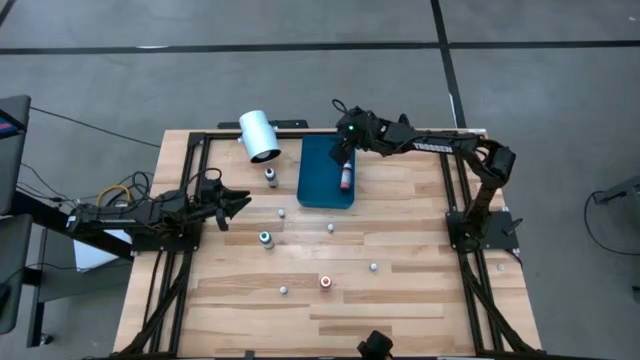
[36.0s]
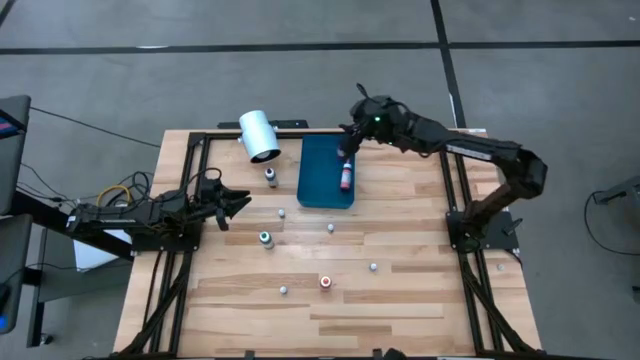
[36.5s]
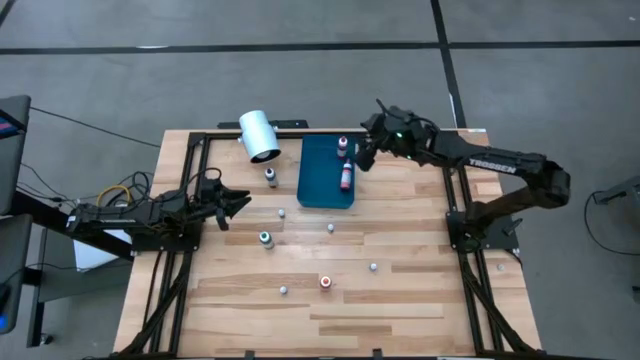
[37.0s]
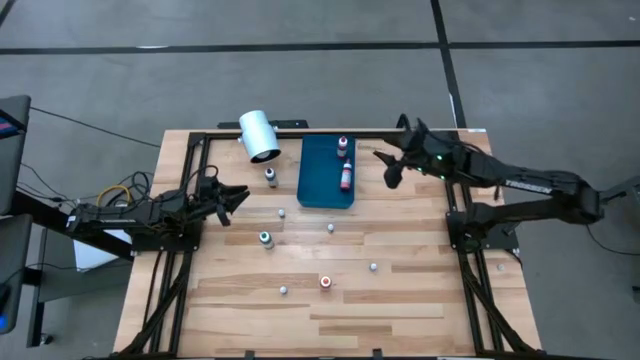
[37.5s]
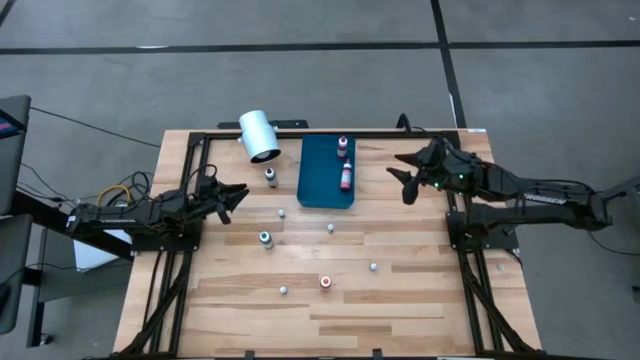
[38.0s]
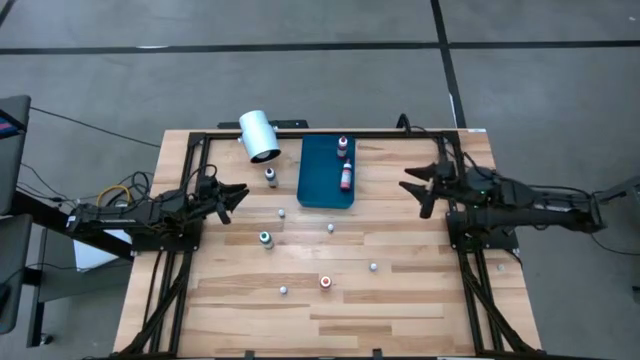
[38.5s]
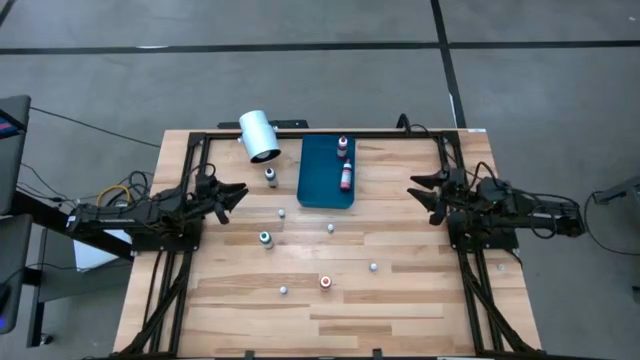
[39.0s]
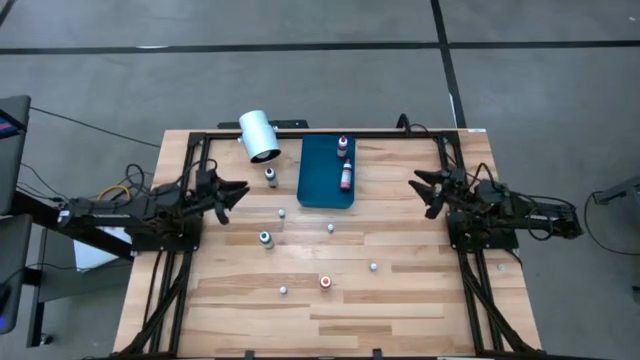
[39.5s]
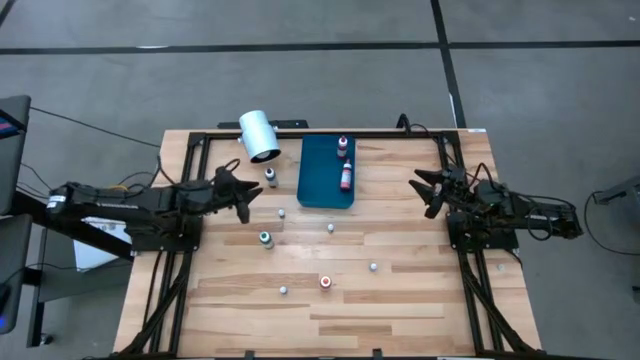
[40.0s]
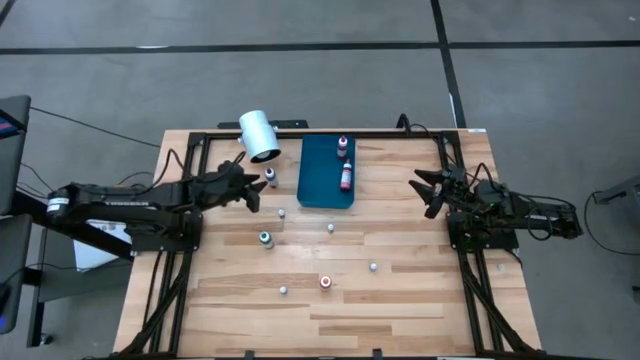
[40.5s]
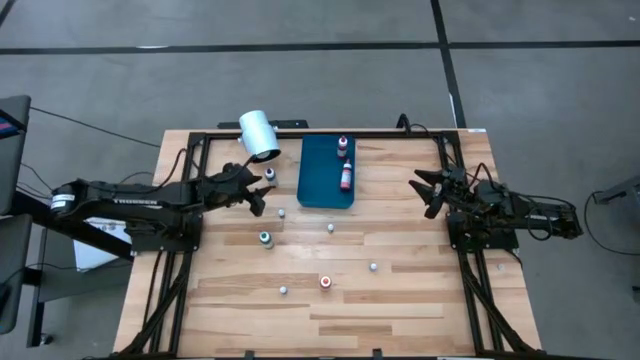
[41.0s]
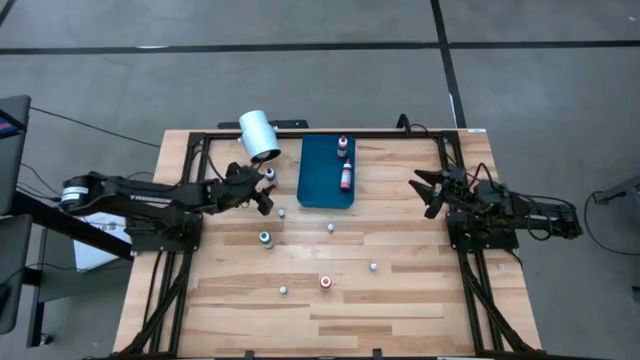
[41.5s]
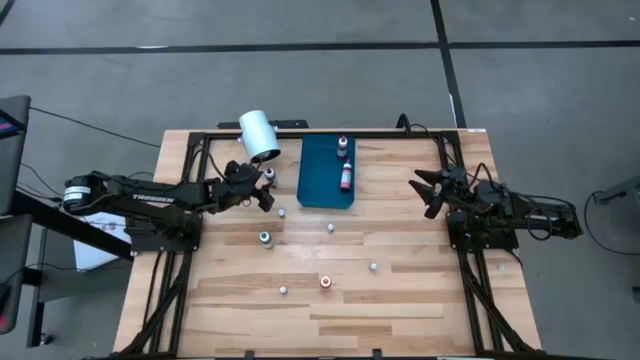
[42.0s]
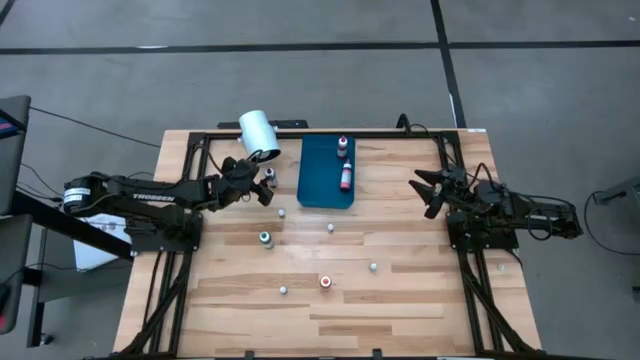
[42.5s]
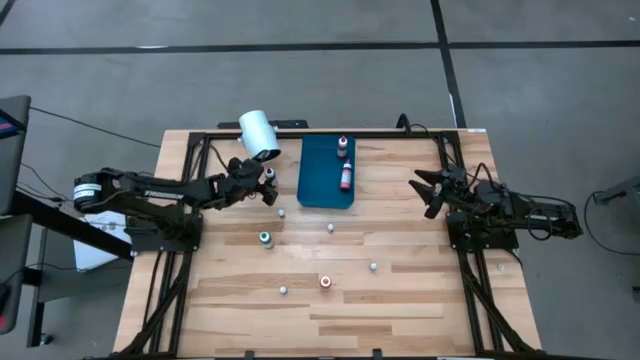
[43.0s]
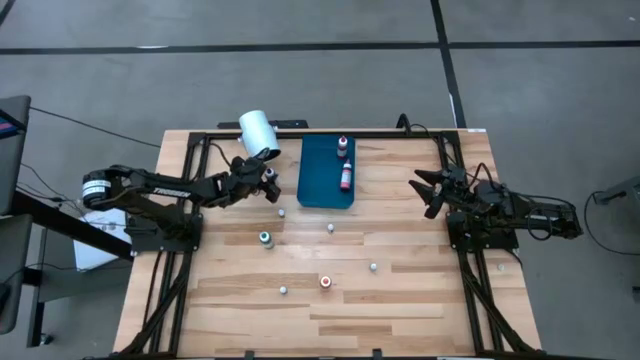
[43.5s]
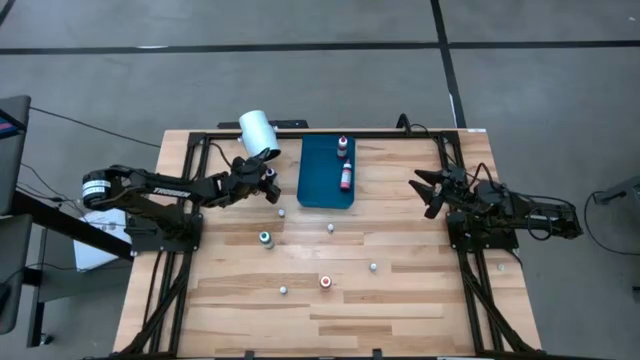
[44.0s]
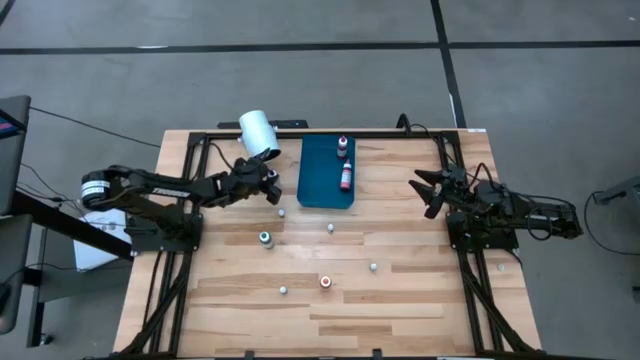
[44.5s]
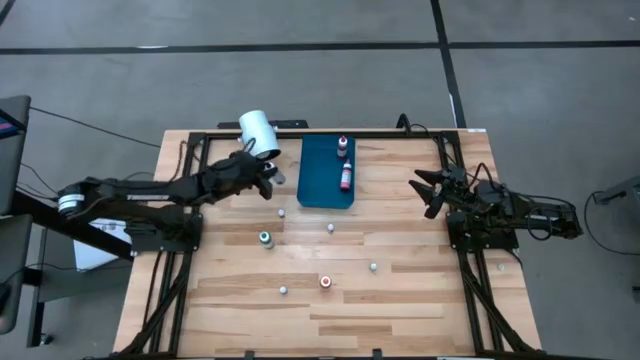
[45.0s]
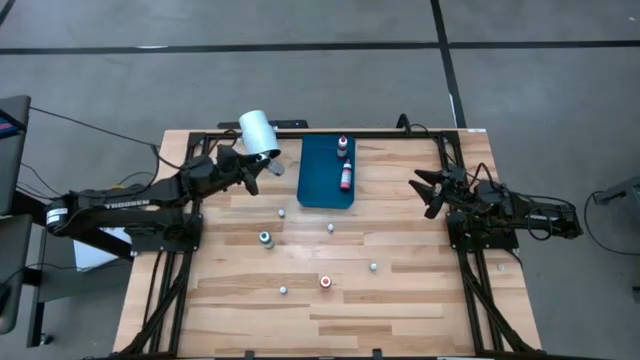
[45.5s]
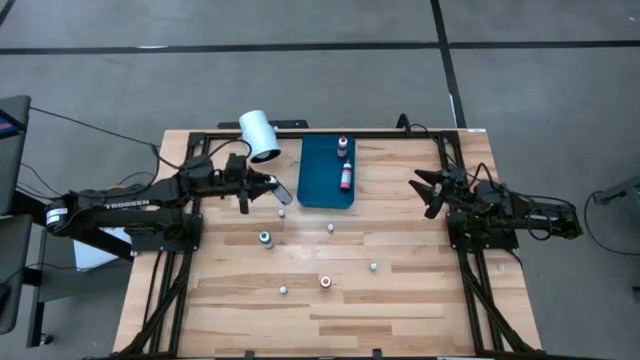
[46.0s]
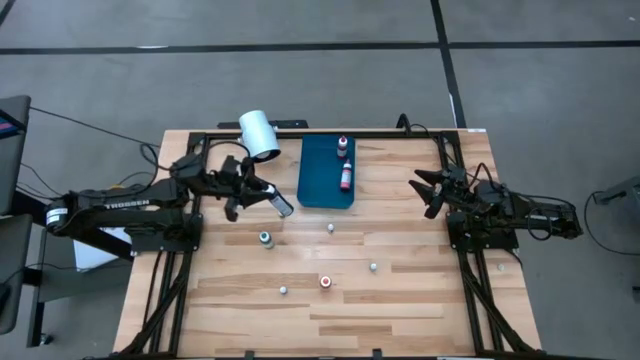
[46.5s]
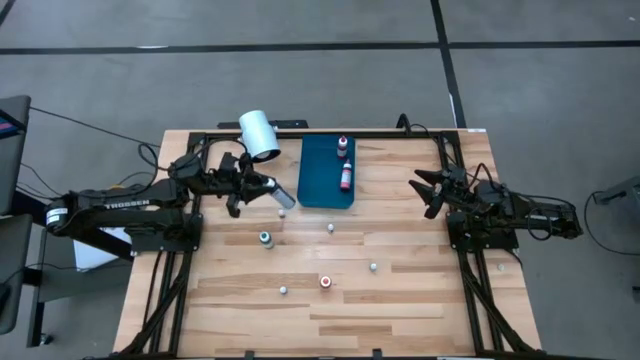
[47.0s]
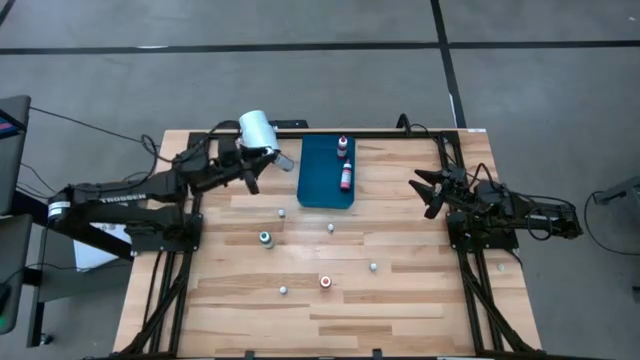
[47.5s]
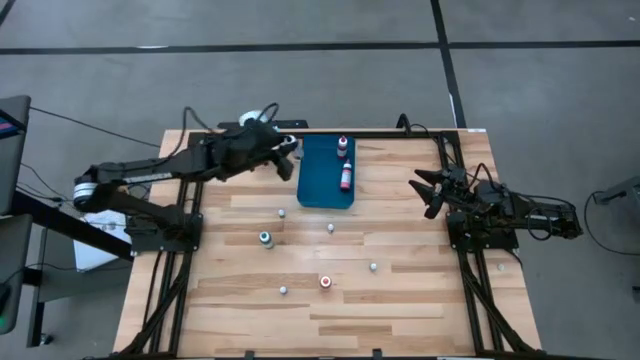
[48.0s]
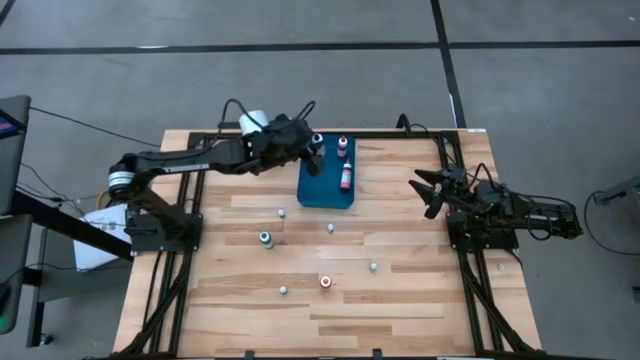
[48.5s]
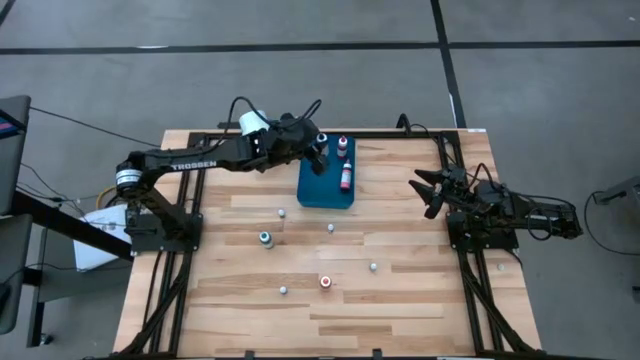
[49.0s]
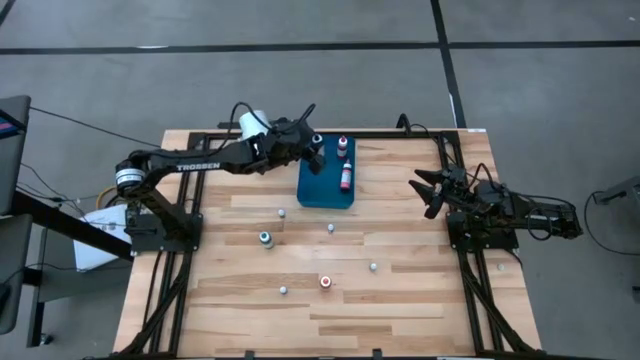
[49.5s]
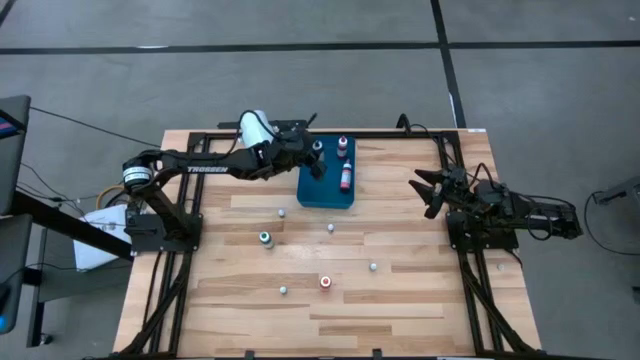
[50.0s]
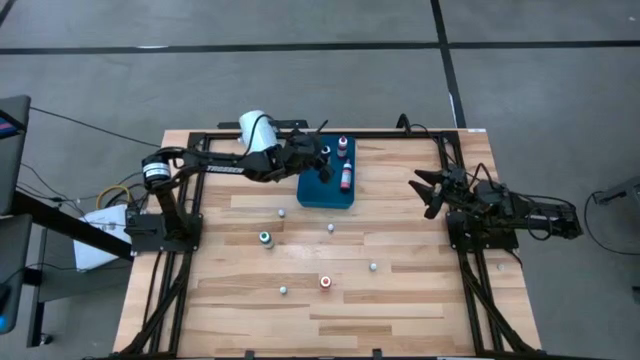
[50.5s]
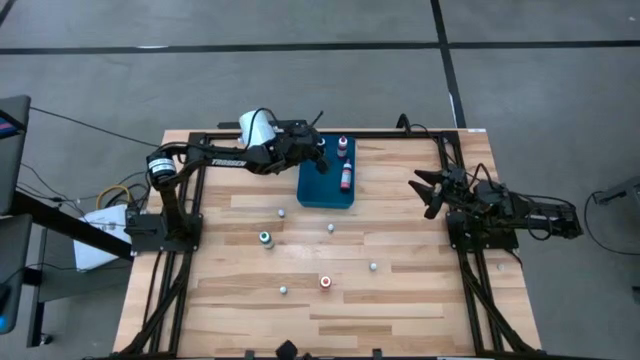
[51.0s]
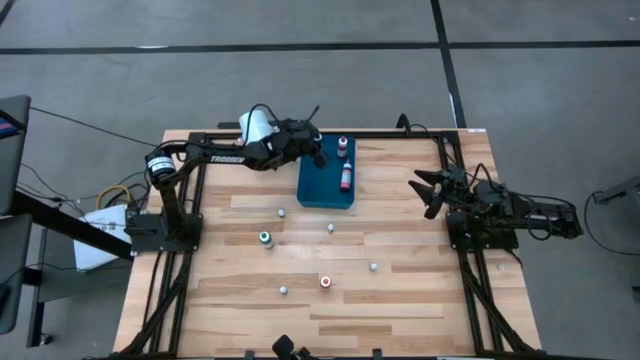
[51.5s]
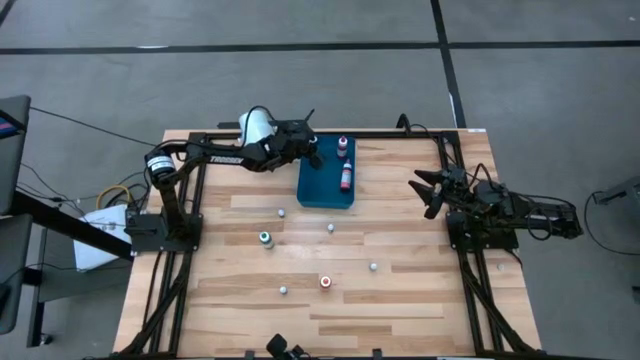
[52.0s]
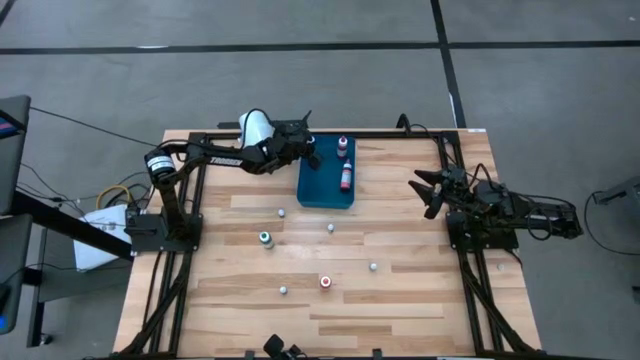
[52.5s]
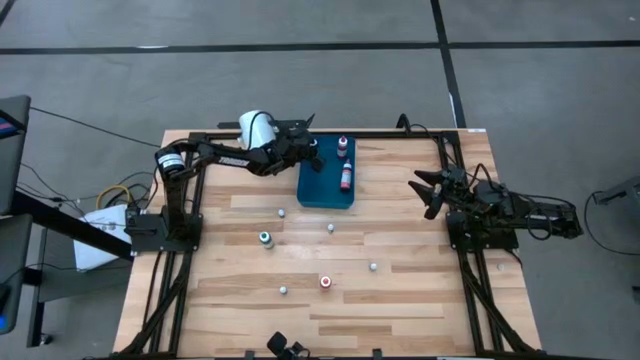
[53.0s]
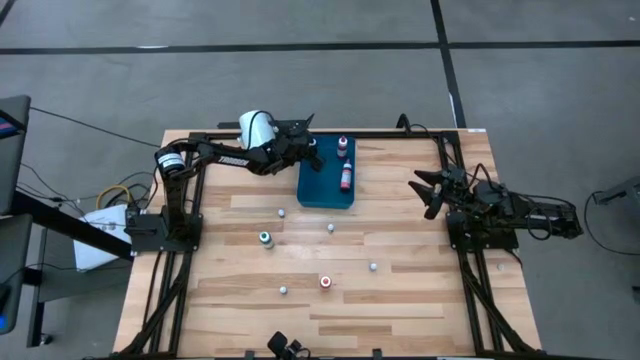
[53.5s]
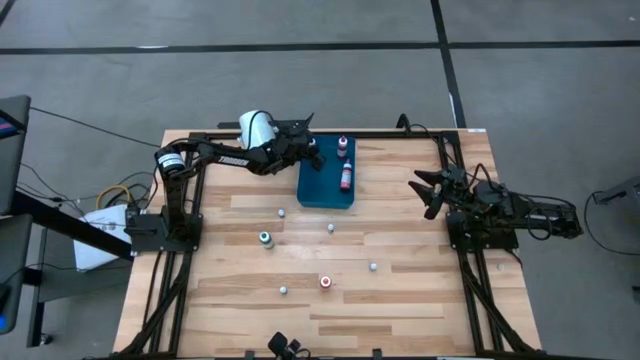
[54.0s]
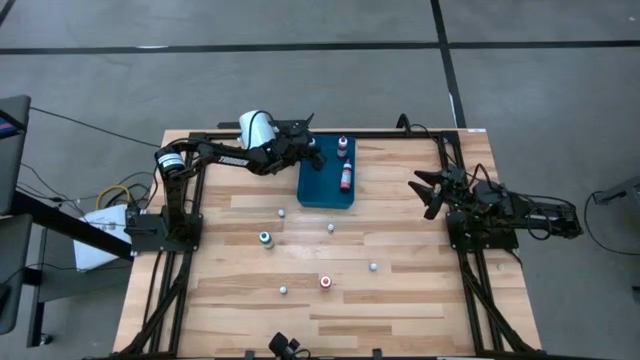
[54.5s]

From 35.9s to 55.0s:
Task: Pick & Place food coloring
Put the large black food coloring bottle into the blue bin

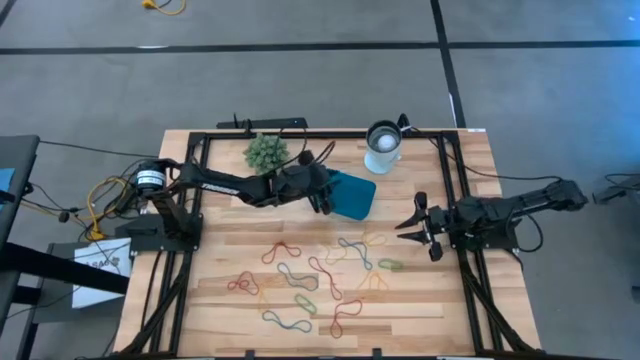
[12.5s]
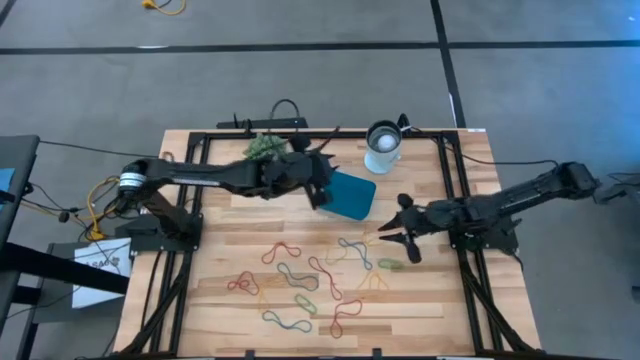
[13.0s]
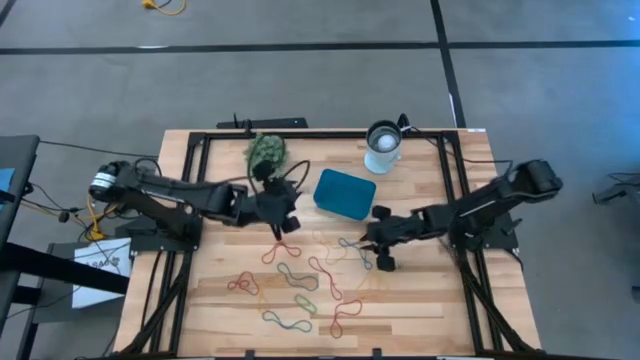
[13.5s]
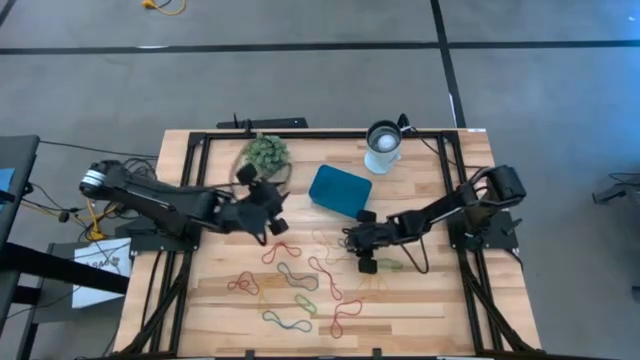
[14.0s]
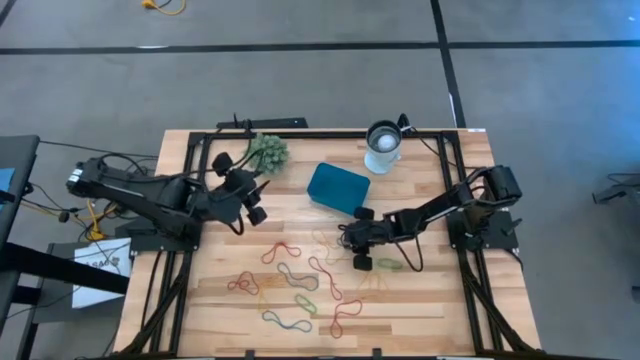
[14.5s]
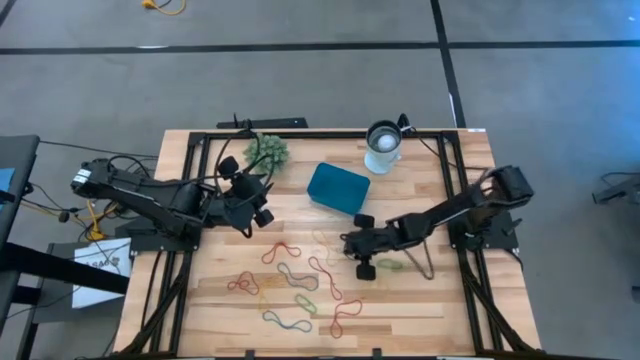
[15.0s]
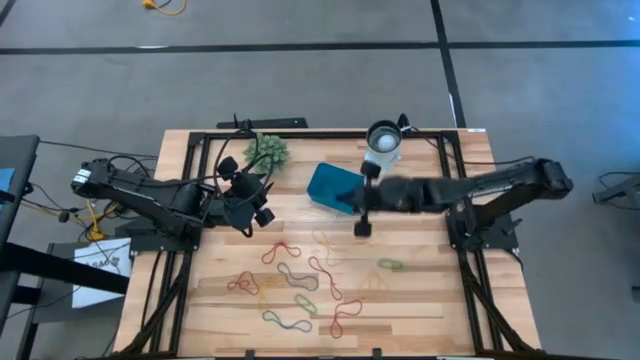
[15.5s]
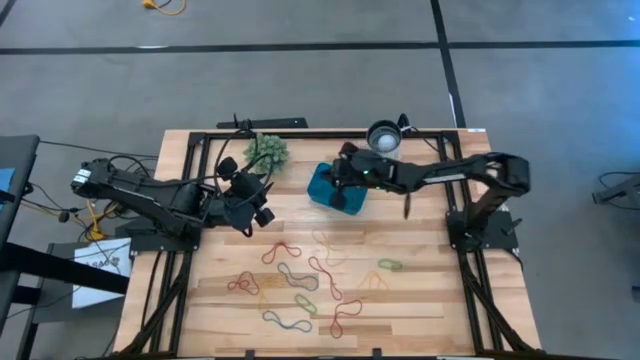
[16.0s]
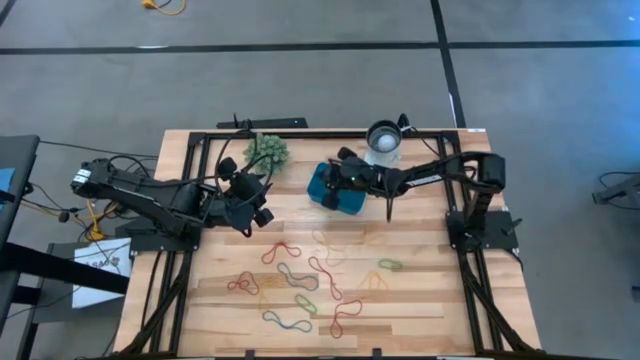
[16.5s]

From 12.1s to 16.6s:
Task: Pick and place items into bin
Put the blue rubber band into the blue bin
